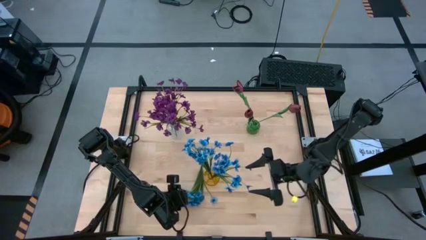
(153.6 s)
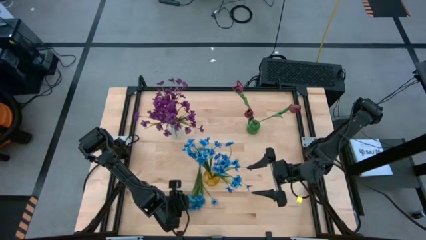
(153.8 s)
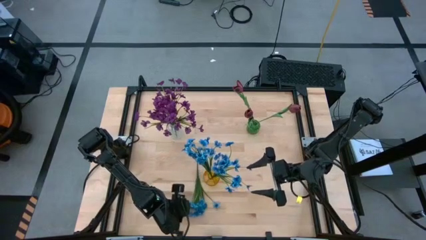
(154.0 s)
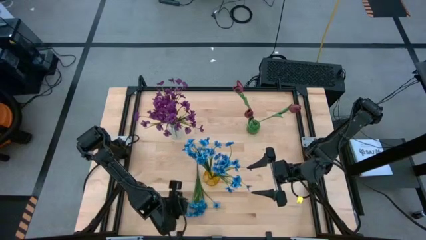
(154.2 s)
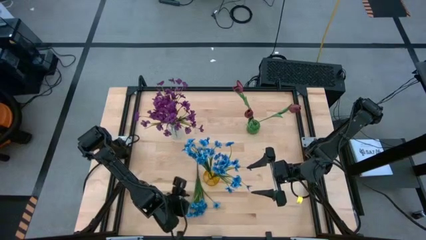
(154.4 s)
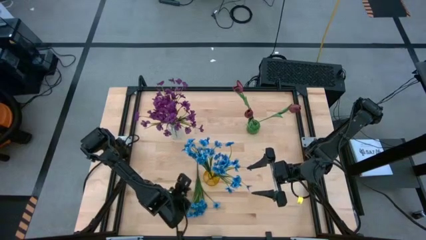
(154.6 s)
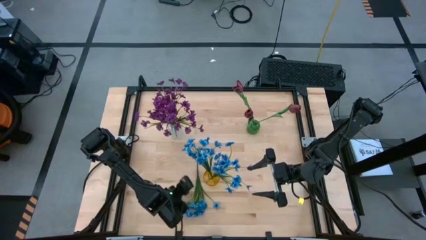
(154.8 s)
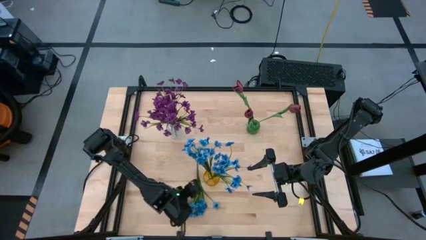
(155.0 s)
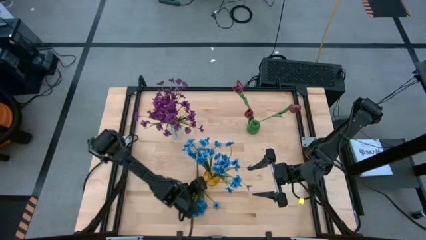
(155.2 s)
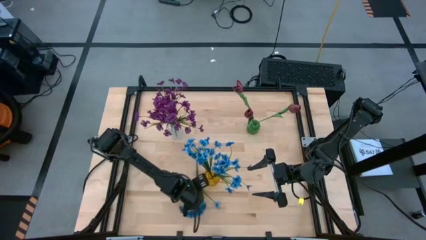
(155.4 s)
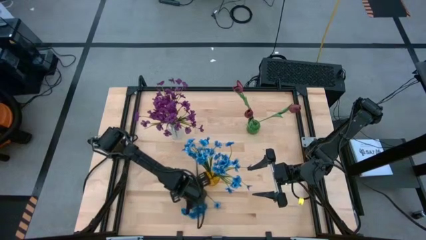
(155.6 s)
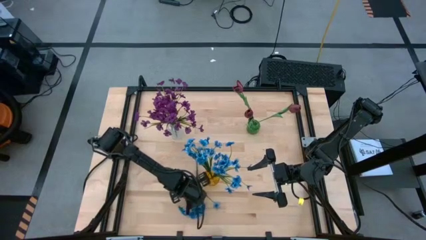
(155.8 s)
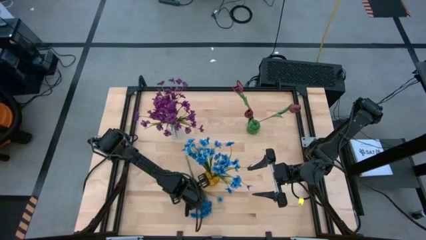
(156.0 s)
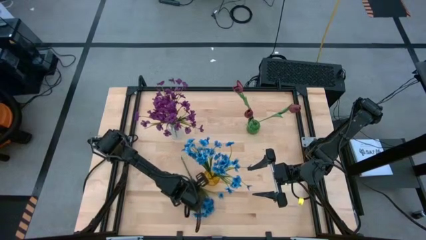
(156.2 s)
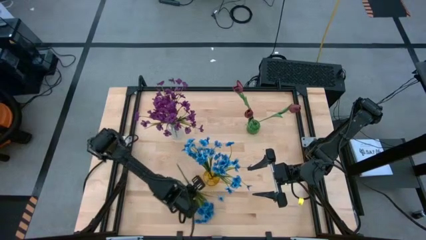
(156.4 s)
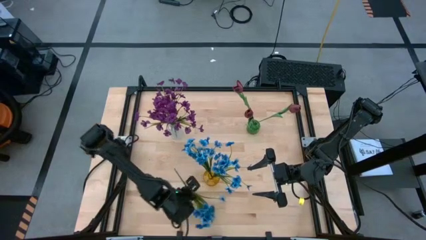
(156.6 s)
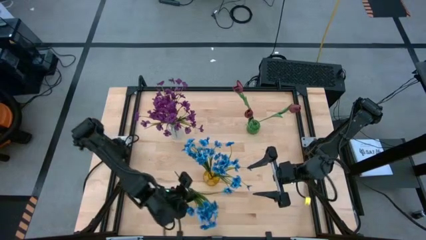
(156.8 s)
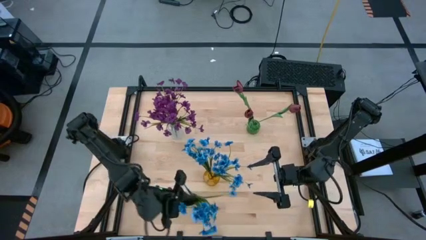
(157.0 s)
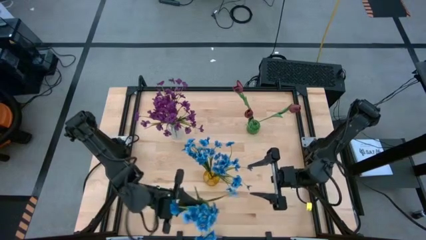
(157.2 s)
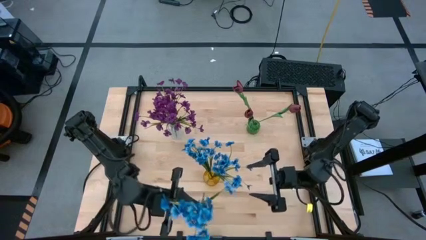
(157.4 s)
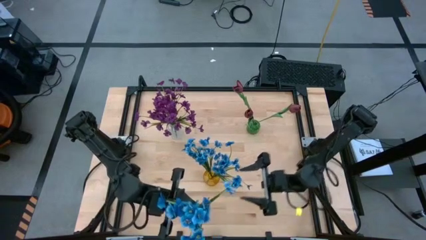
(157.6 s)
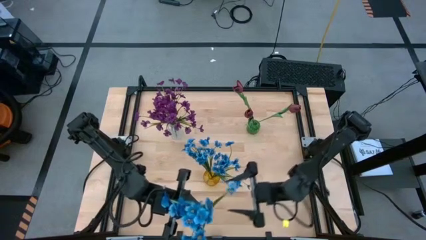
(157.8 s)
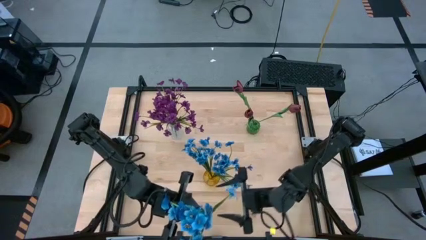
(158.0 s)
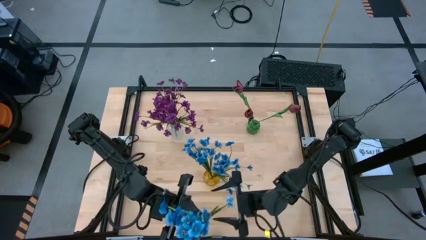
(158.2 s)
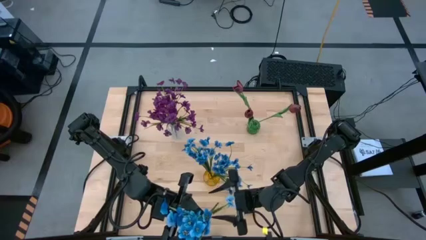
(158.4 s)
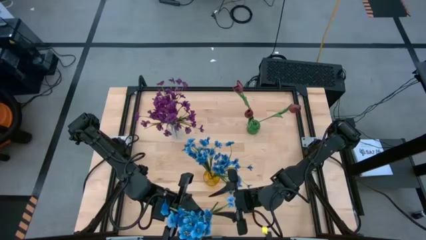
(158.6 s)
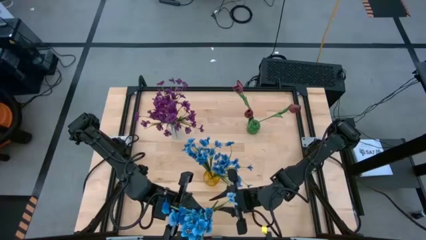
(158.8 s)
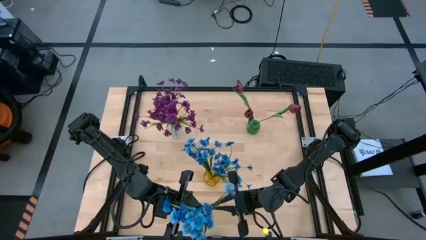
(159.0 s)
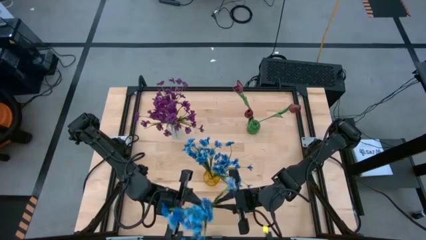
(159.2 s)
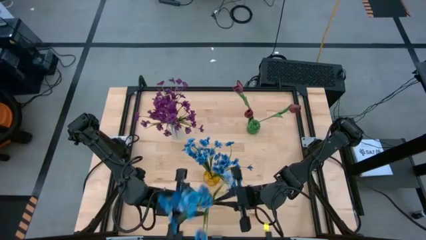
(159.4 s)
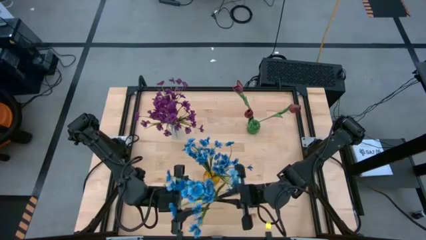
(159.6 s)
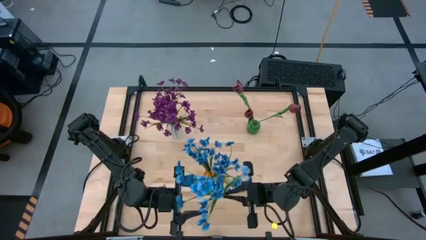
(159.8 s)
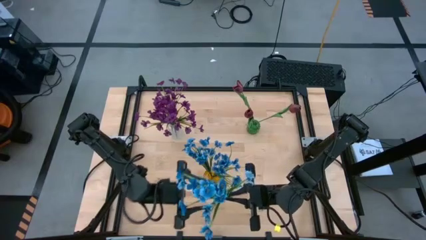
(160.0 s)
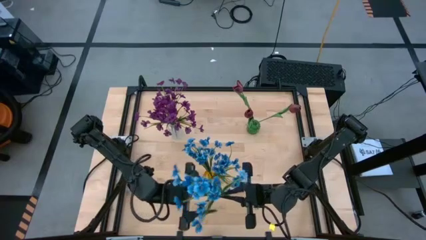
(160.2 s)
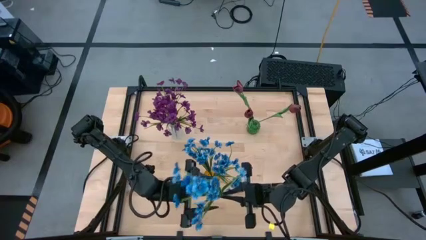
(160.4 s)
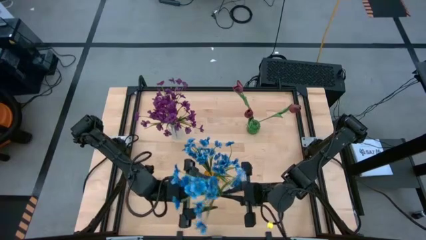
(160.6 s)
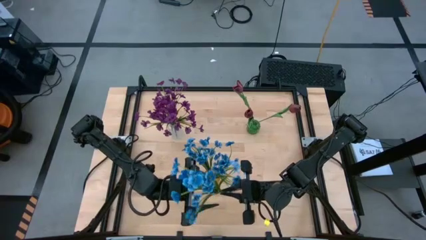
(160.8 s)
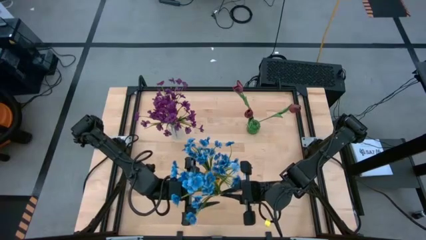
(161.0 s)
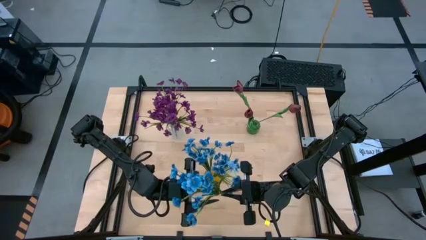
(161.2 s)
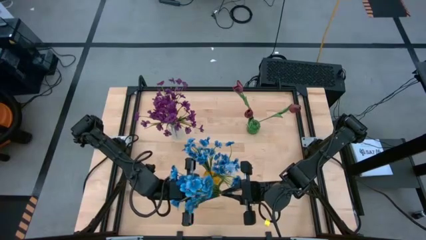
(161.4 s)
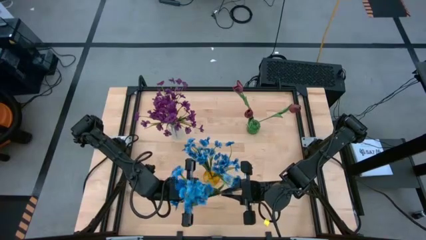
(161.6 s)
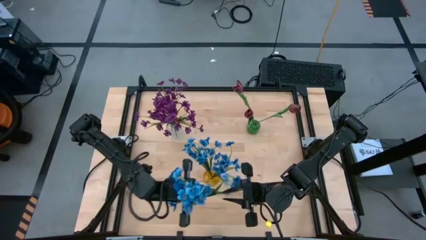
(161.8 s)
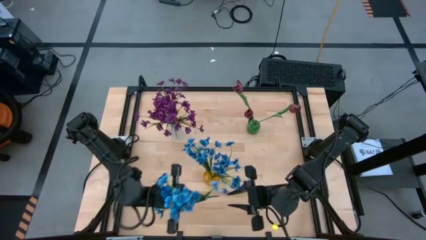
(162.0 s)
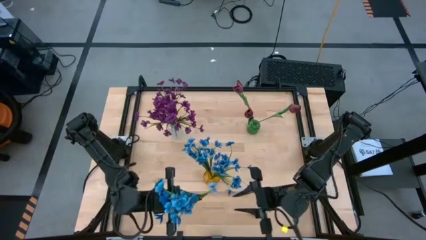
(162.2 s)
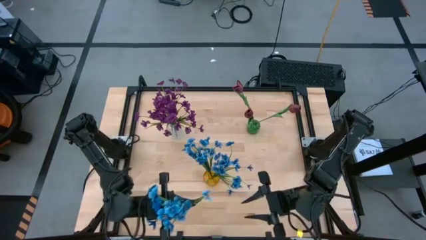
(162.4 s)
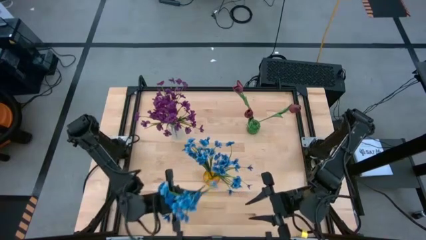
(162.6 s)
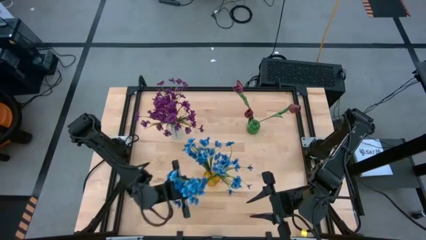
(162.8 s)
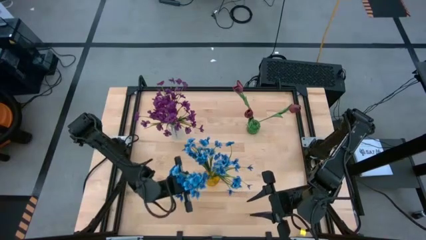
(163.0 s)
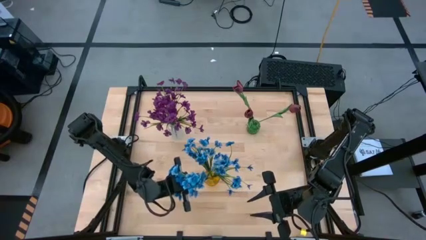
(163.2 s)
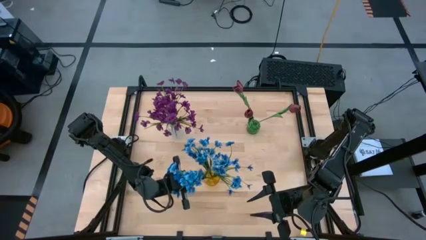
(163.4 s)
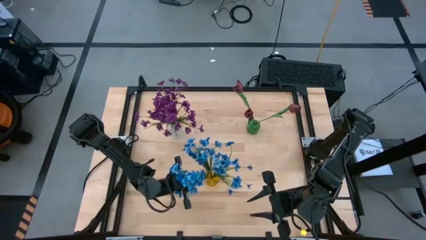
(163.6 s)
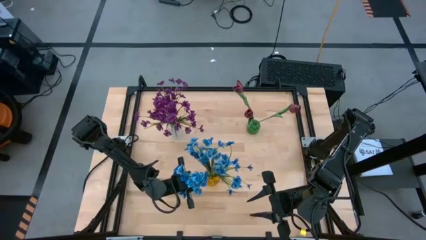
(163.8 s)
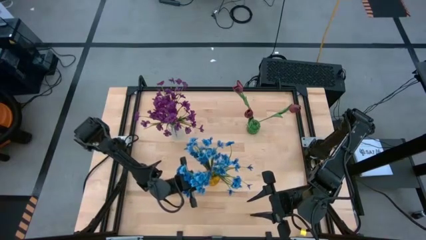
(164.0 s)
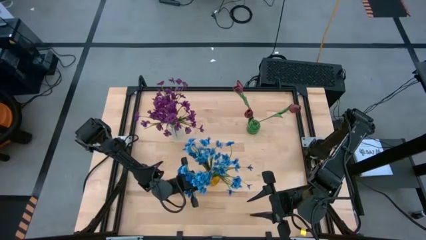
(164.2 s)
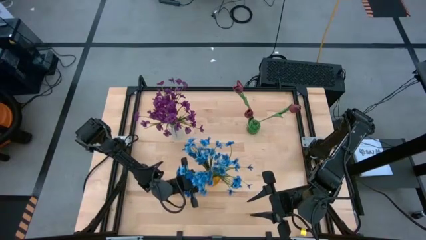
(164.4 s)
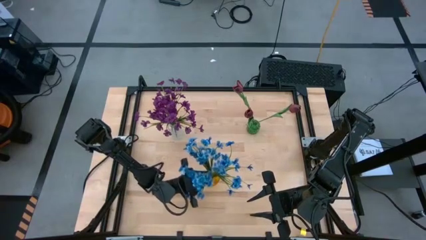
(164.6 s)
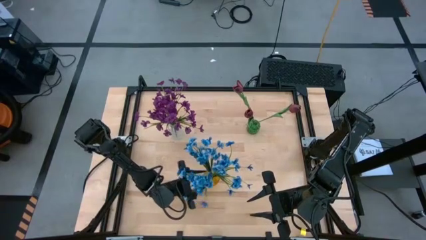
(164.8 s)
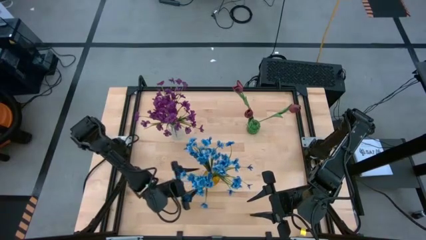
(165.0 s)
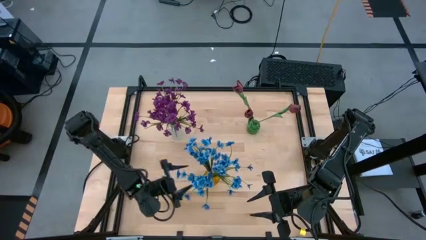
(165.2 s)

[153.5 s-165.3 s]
Task: Sort flowers into vase by color
Put the blue flowers into the yellow vase

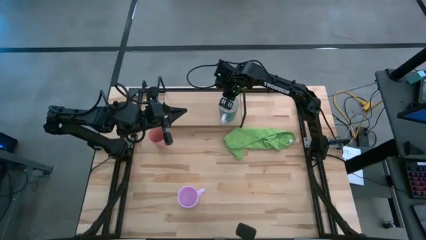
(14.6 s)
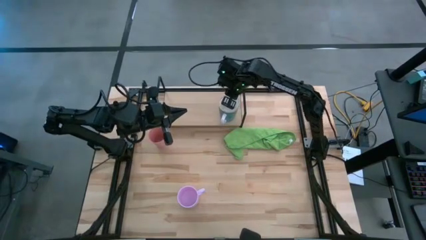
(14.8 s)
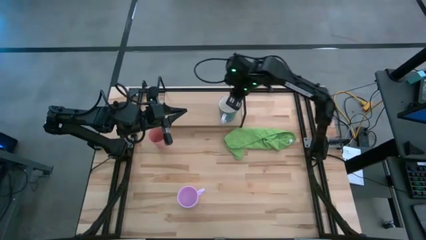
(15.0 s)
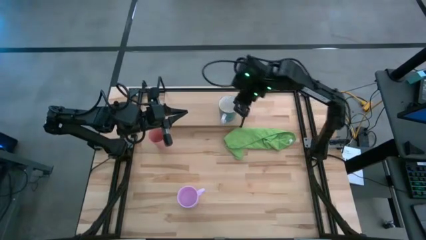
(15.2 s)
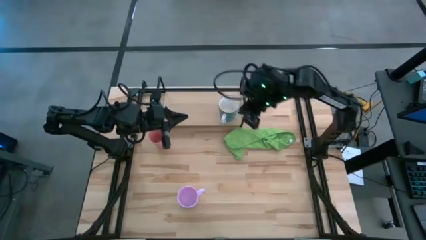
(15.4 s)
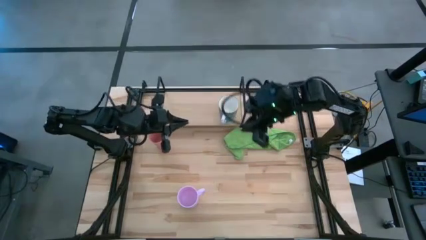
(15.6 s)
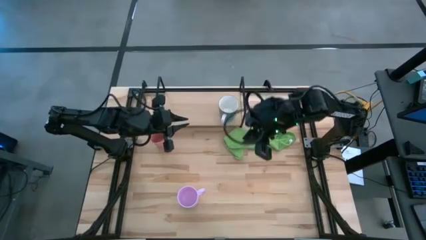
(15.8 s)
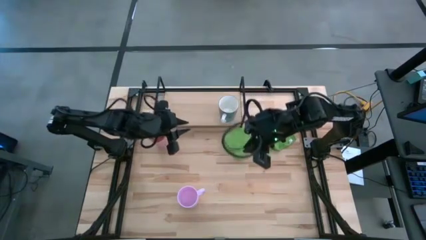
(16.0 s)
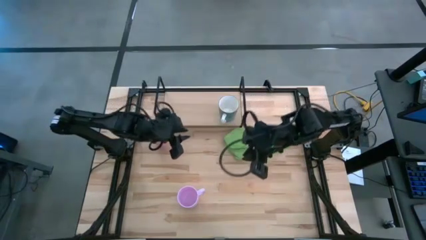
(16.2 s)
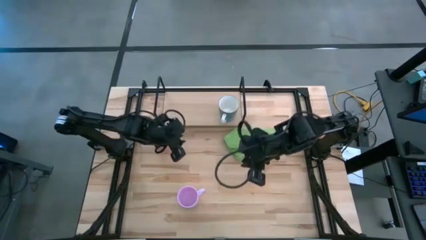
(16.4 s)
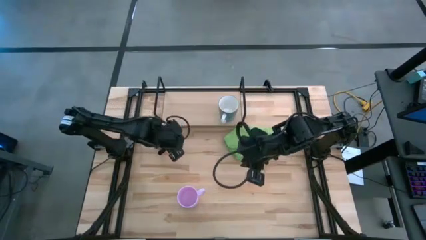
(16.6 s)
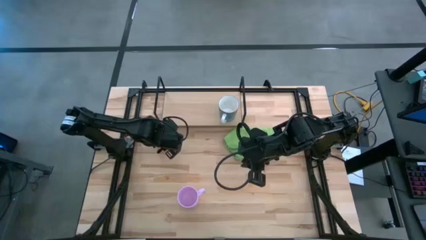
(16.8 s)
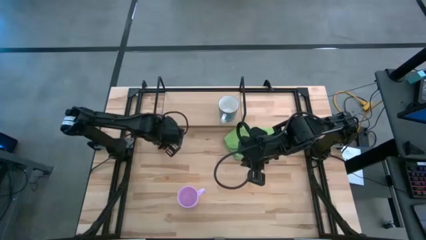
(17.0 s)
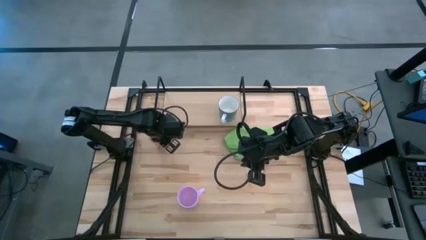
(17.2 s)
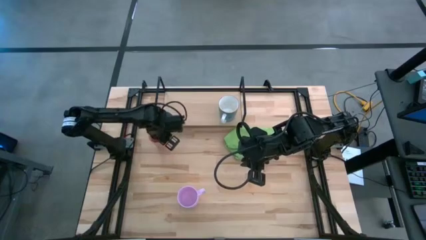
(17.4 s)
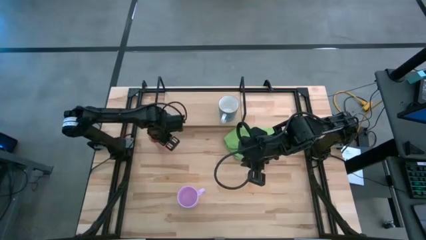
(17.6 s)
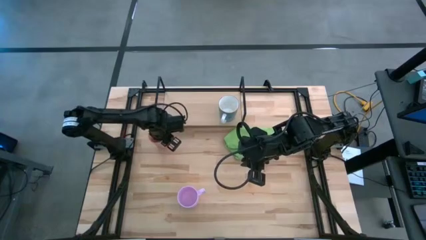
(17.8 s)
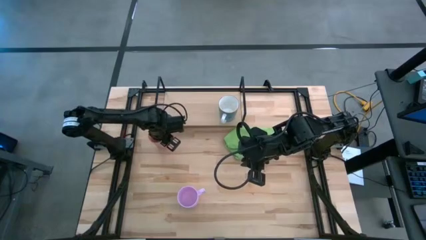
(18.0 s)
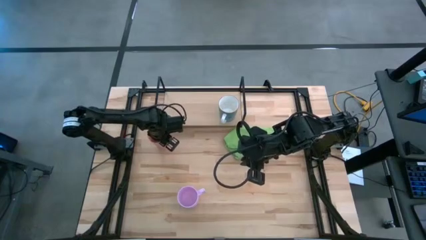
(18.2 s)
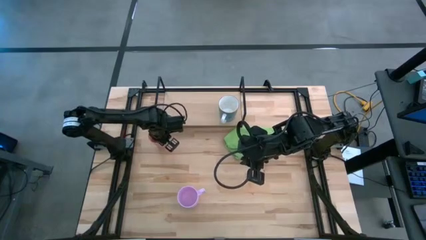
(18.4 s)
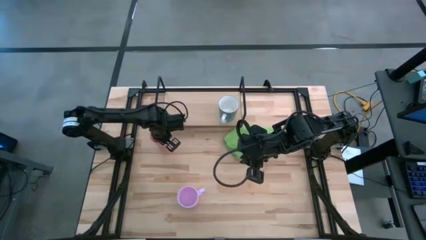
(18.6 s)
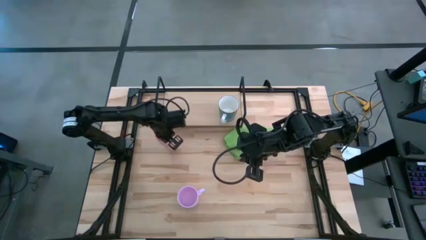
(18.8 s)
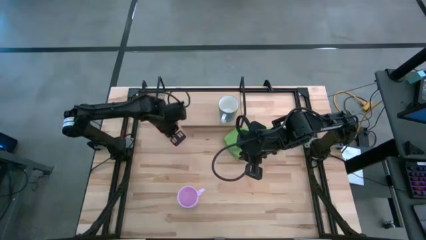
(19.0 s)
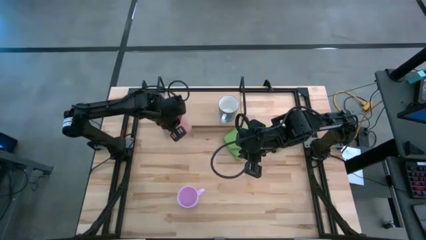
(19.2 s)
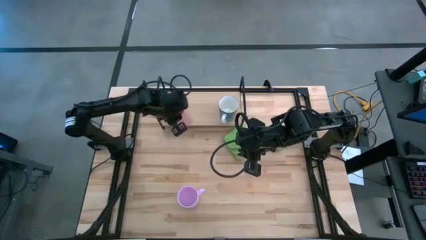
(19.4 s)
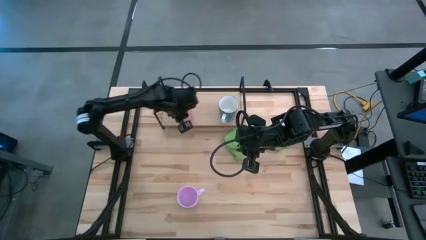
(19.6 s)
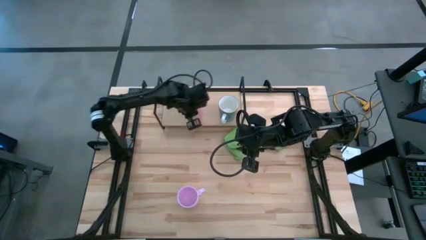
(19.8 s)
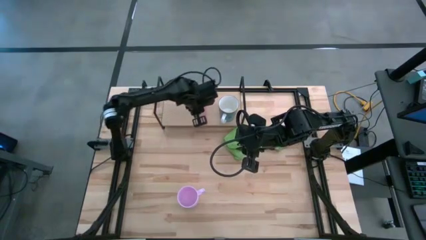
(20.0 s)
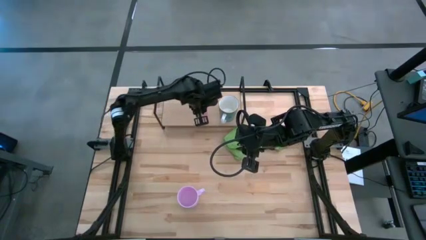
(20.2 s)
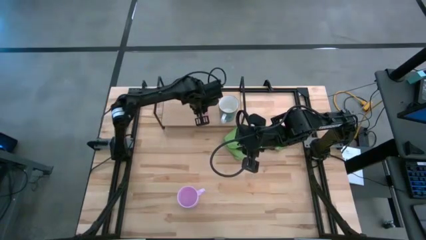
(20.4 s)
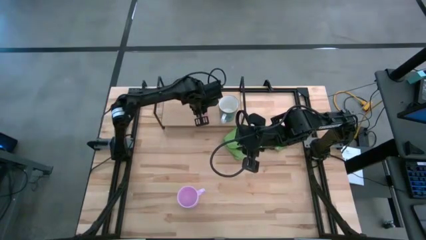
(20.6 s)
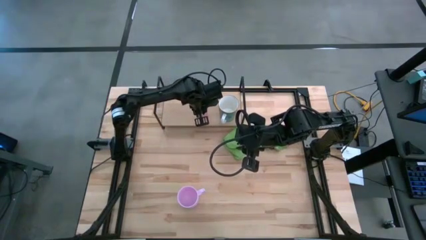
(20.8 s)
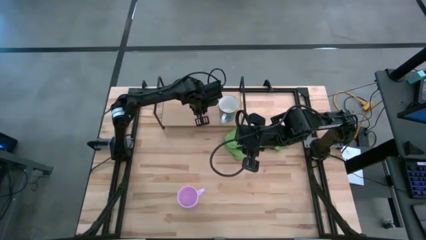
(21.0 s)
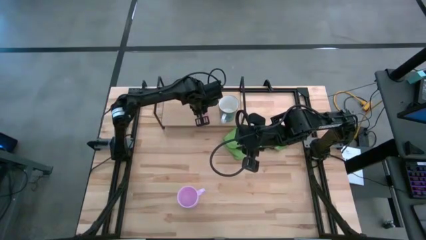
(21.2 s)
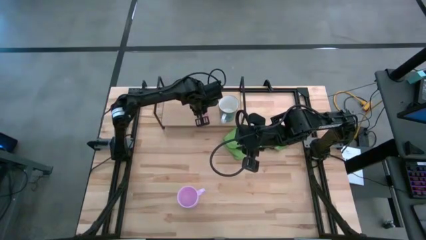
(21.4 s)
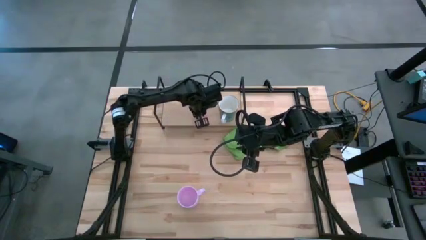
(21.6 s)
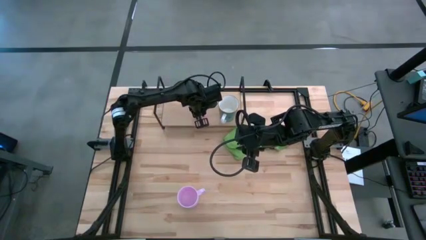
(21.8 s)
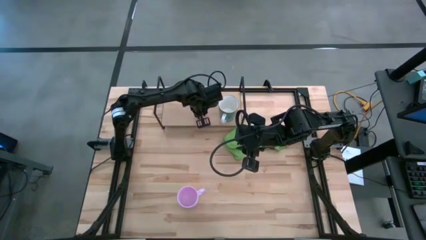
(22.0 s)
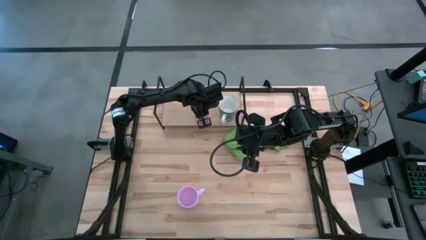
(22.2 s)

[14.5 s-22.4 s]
Task: Stack small to large cups/mugs on shelf
Put the pink cup on the shelf
